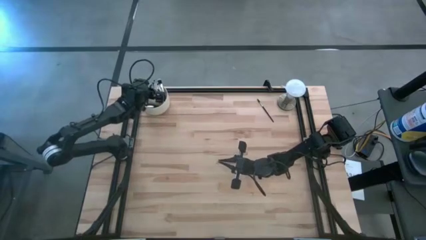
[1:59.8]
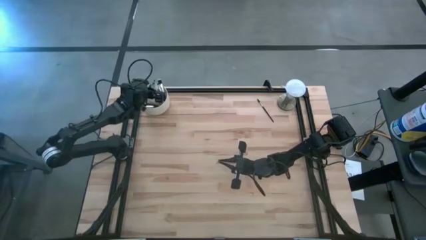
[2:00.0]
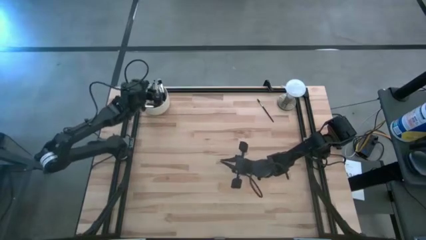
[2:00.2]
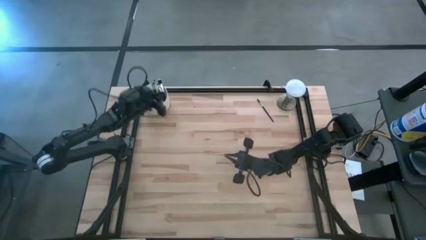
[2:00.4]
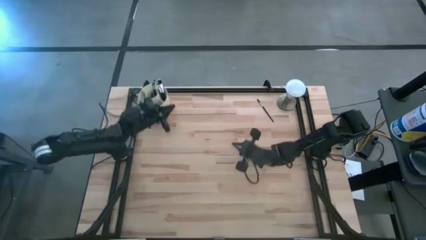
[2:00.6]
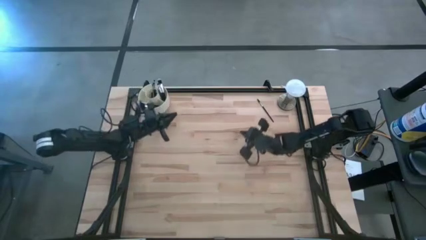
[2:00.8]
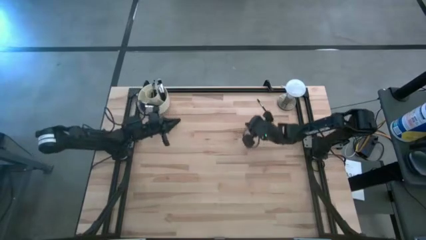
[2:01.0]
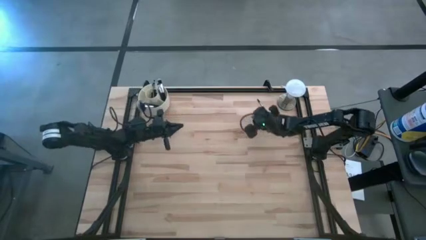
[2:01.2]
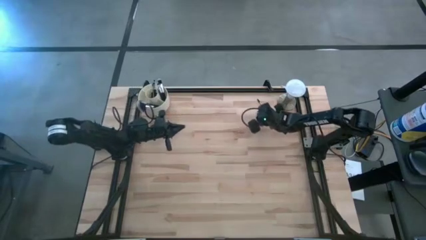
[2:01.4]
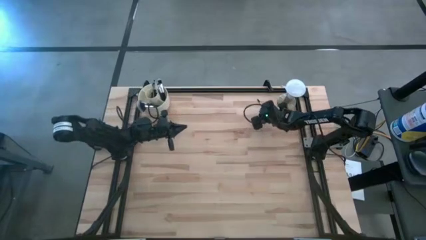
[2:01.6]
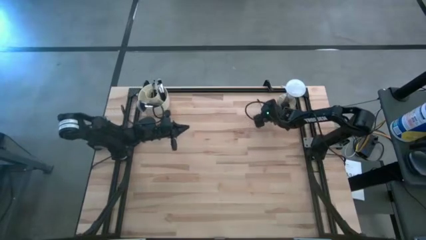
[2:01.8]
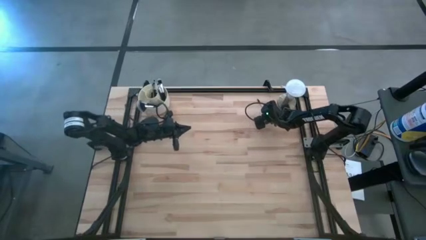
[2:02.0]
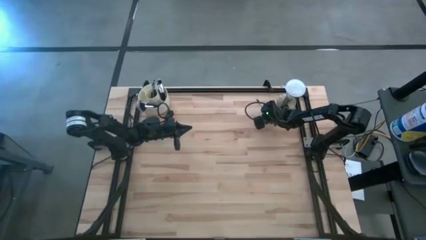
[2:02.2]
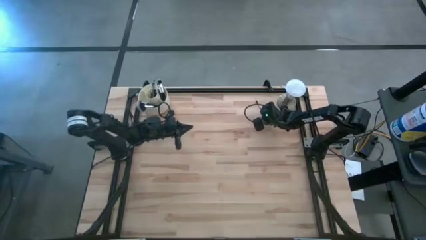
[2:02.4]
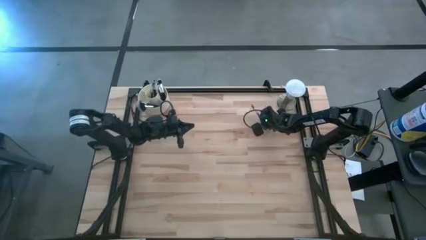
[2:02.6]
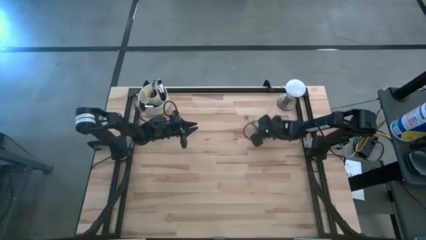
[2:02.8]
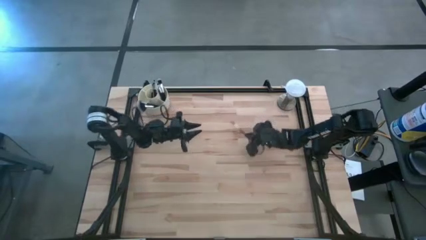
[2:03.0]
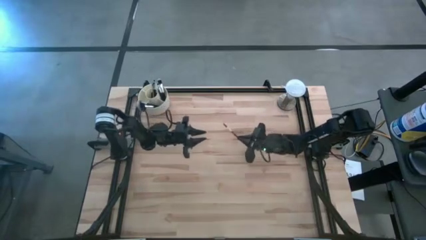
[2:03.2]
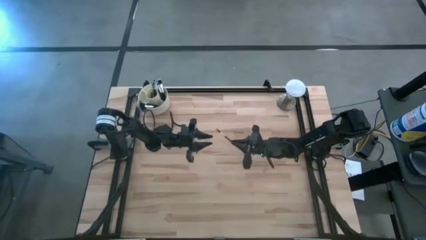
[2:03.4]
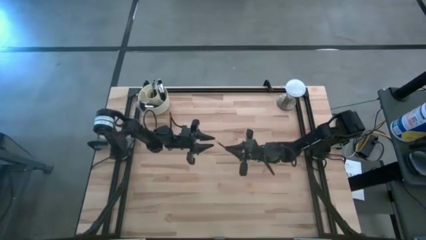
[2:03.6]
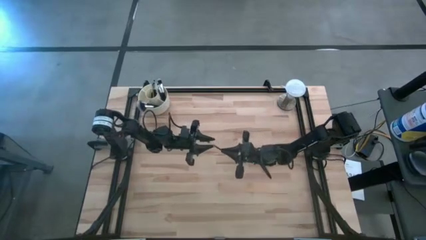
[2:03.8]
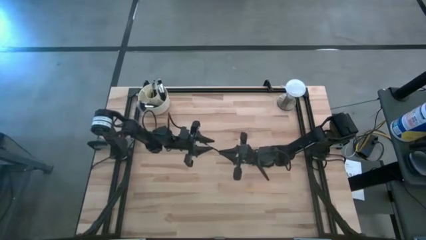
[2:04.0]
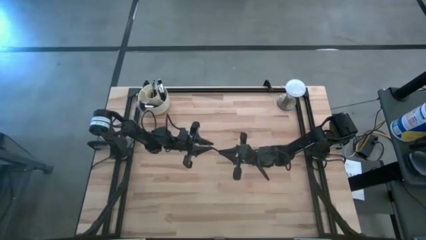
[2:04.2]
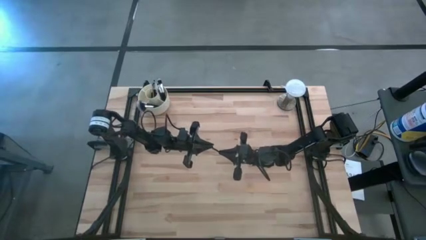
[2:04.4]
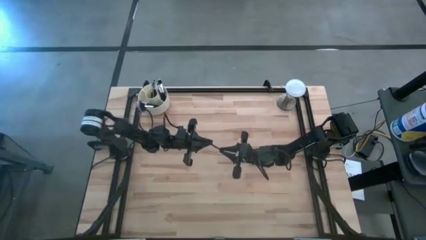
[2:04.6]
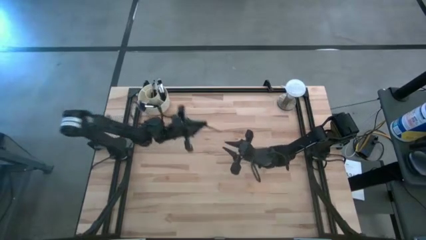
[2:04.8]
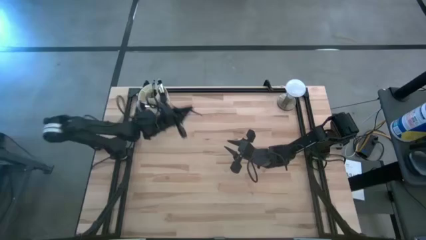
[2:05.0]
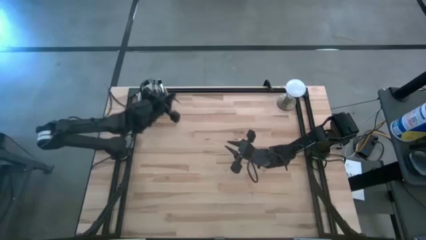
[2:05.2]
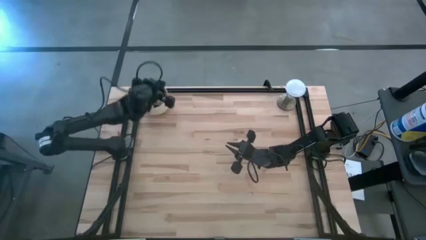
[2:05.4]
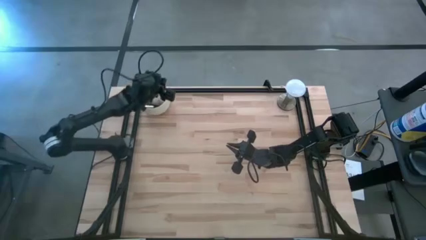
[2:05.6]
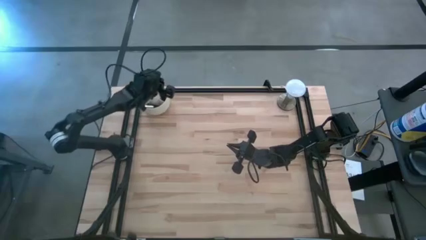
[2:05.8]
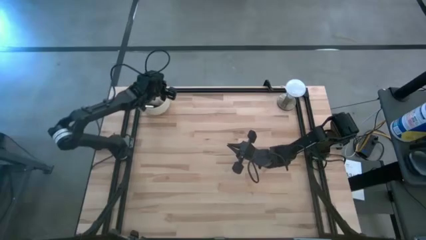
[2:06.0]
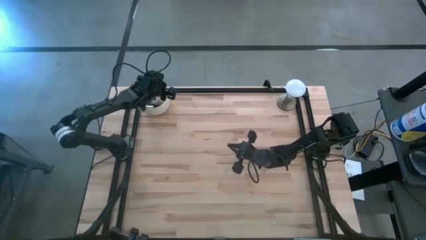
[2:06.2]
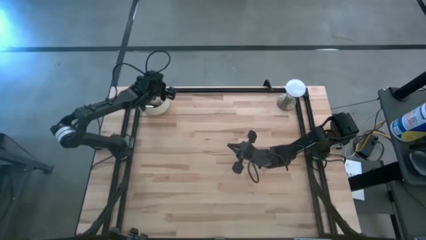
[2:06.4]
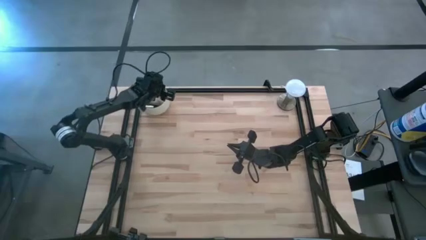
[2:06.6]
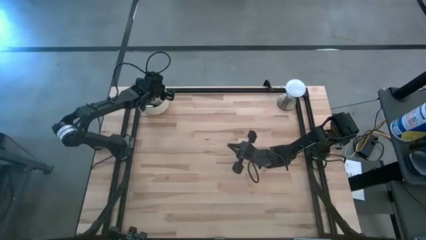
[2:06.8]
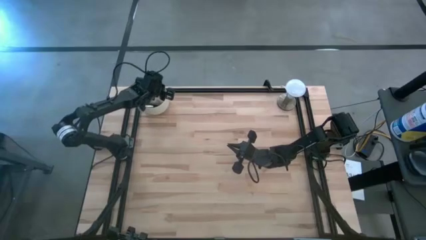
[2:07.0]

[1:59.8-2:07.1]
Task: Put items in baskets/containers
Put the brow brush into the organizer

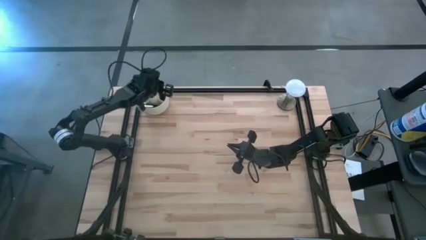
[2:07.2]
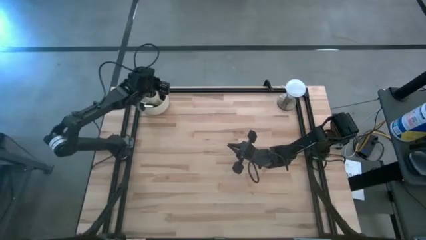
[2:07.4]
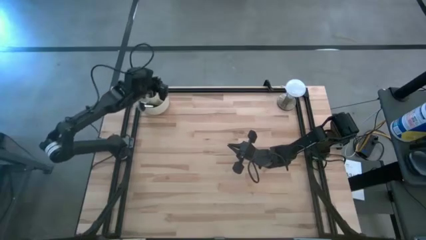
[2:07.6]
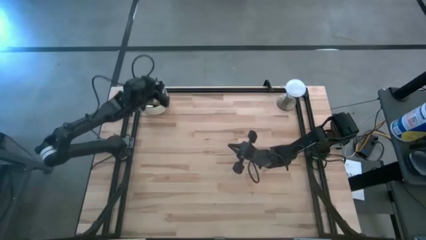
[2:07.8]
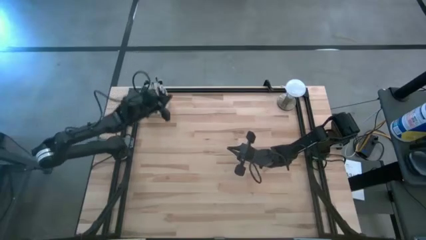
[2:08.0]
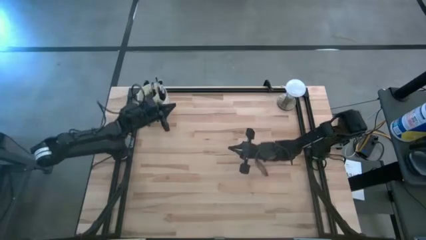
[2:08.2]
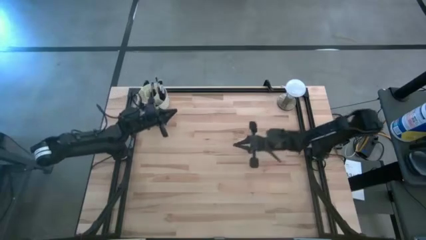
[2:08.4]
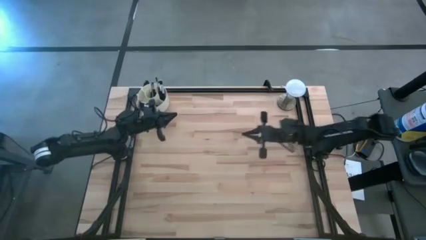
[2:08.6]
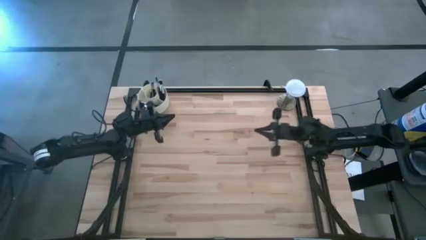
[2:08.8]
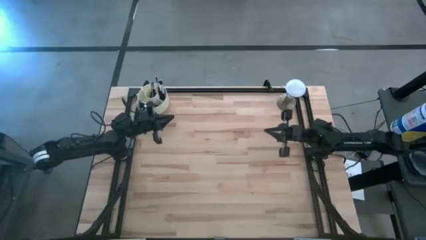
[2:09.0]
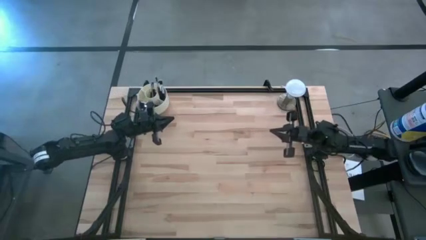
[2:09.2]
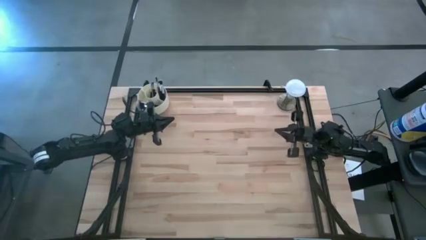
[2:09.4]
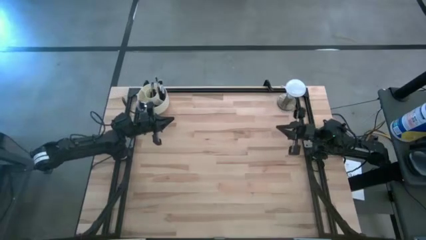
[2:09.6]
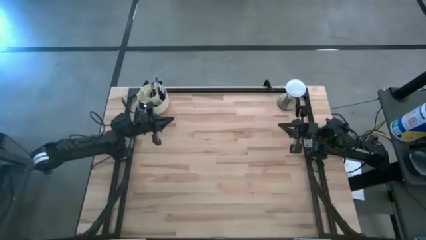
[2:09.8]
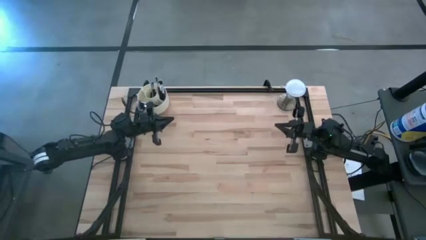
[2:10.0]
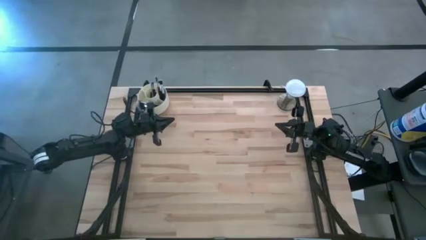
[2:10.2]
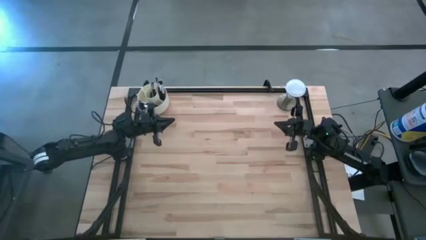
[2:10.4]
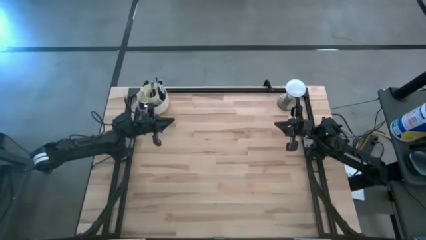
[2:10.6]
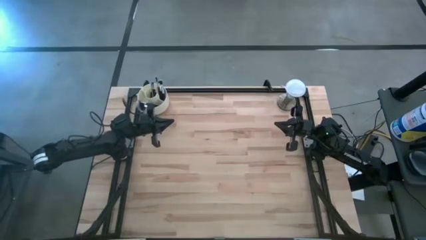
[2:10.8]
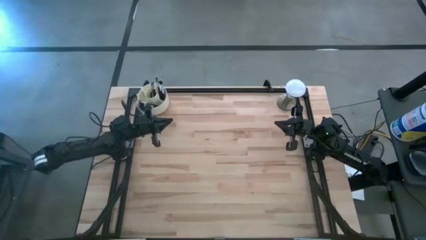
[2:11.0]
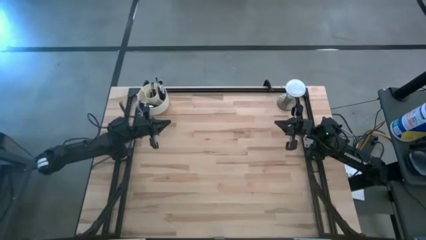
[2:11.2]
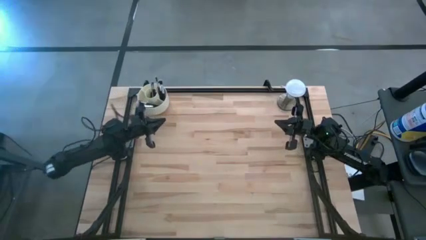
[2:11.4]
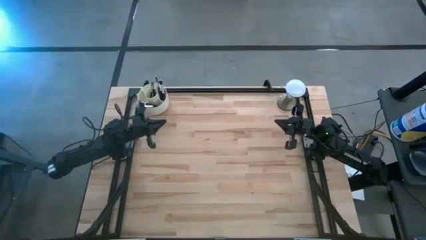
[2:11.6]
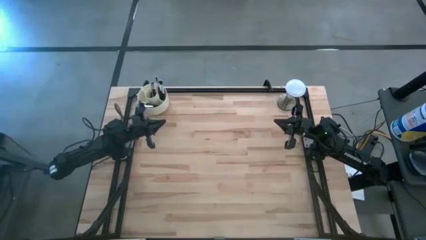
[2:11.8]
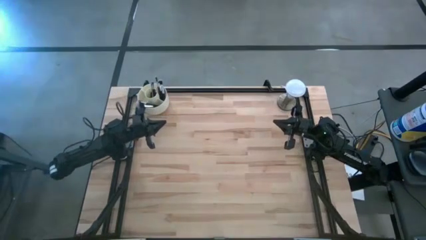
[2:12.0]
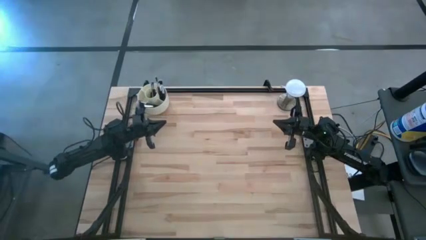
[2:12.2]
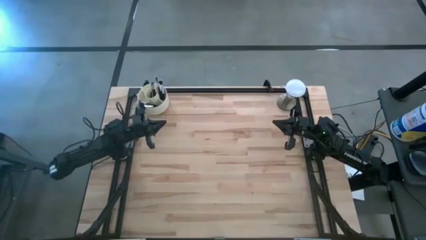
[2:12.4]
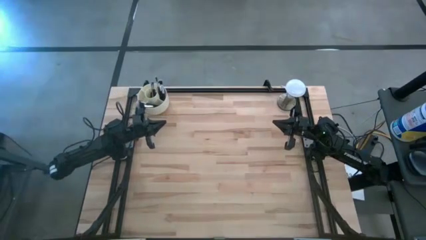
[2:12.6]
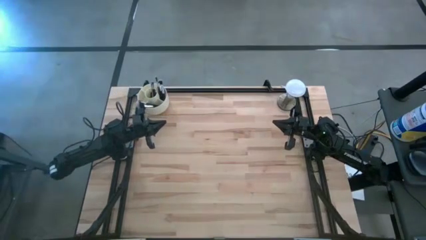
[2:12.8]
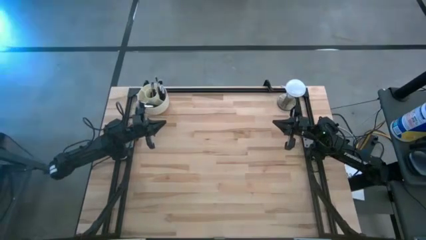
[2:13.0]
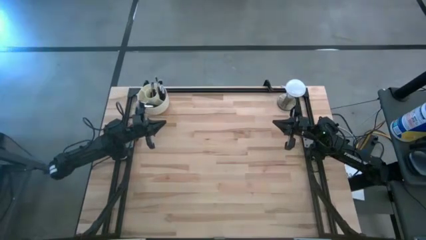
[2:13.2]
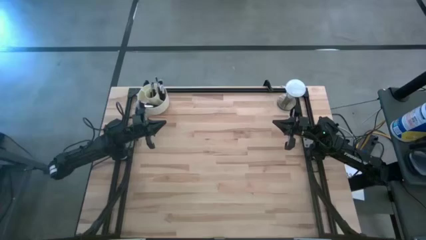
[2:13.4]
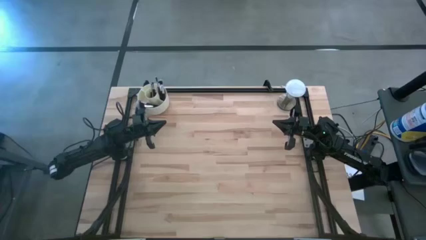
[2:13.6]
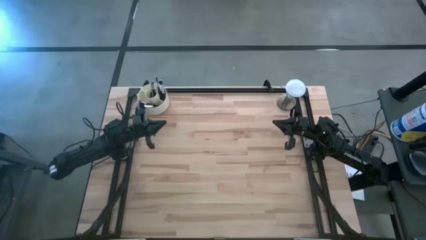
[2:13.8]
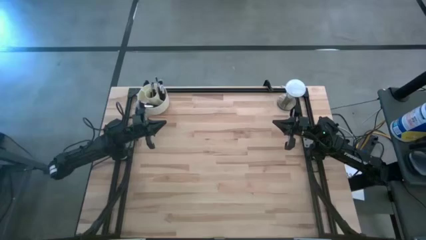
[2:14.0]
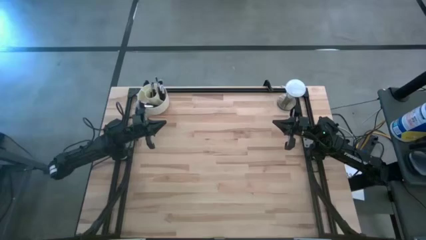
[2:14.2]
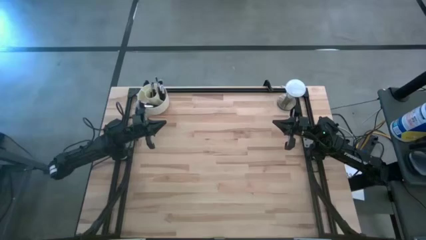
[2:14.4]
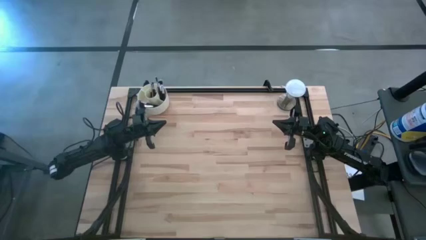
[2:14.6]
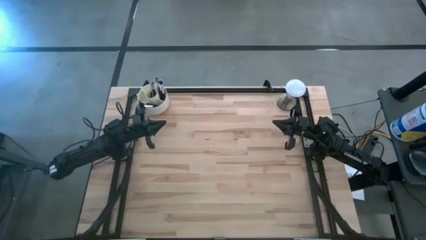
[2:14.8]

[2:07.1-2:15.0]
Return to Home Position

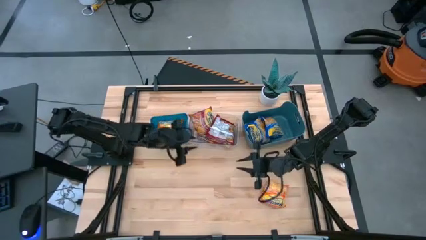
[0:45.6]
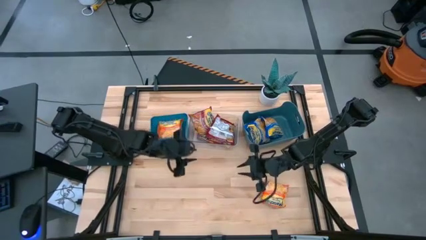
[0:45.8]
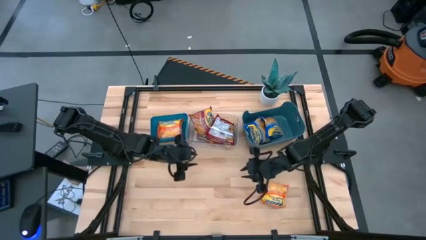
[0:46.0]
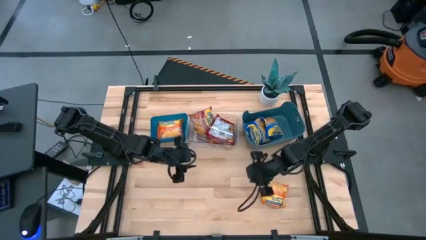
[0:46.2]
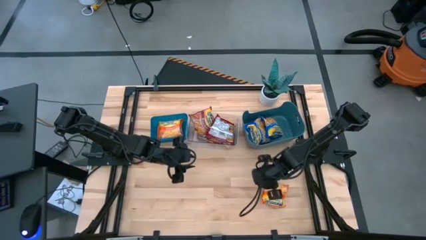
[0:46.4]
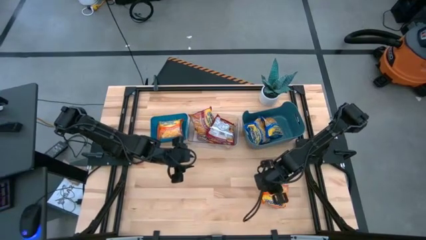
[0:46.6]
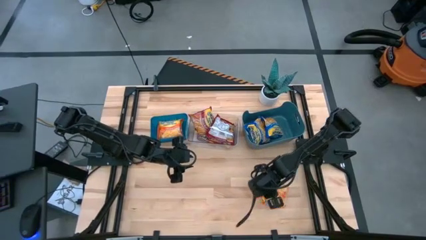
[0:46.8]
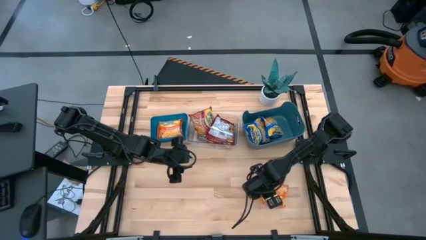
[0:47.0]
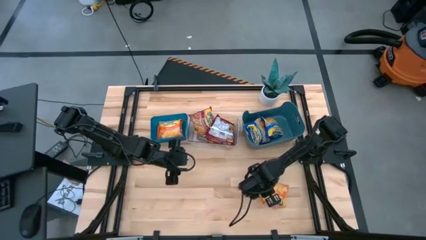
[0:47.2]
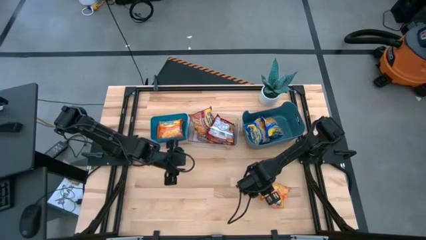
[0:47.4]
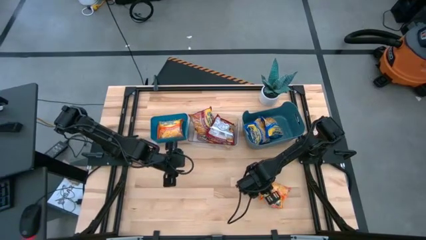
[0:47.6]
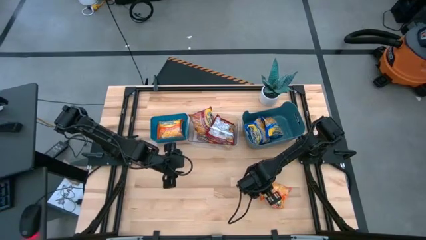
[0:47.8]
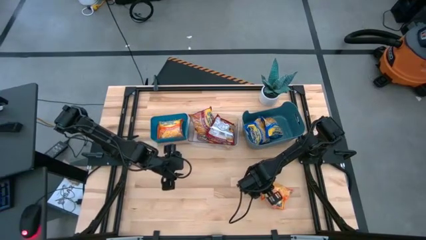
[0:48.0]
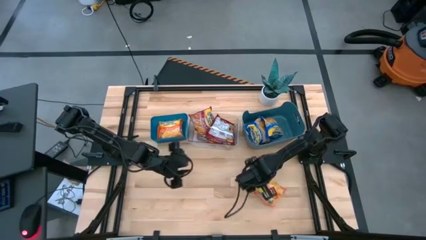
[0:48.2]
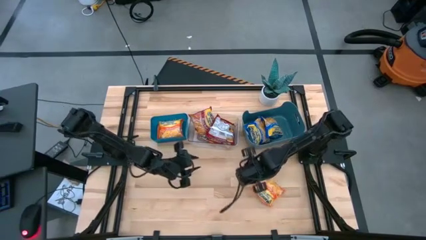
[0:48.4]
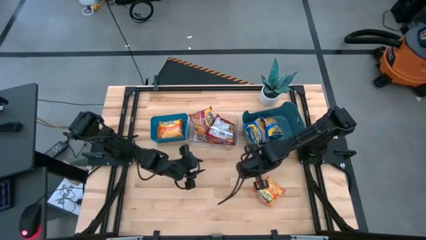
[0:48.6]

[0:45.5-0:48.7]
Task: Sort Maruchan noodles
Put the orange noodle pack into the left blue bin
